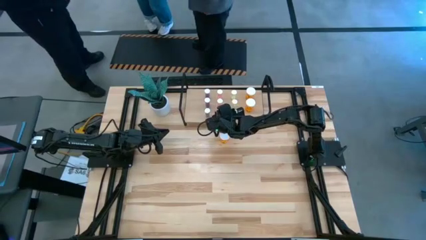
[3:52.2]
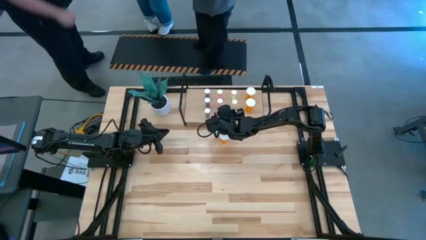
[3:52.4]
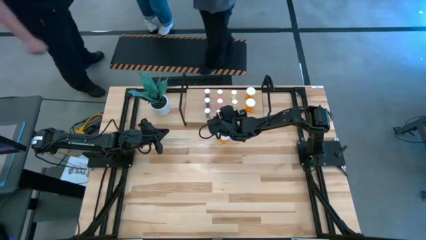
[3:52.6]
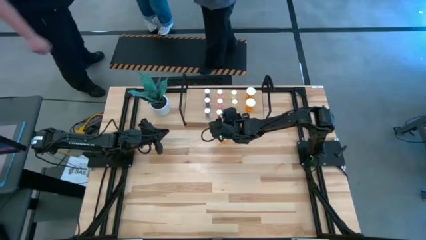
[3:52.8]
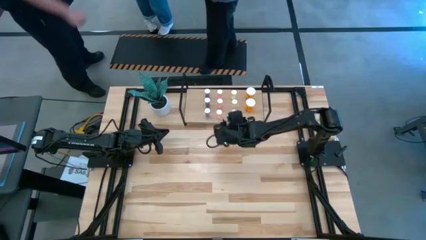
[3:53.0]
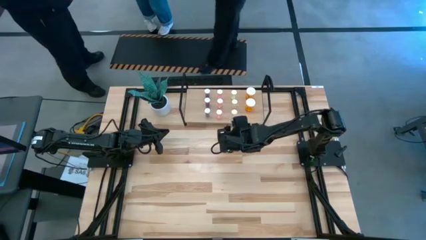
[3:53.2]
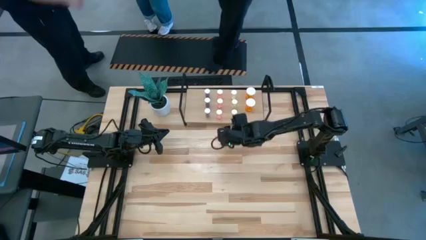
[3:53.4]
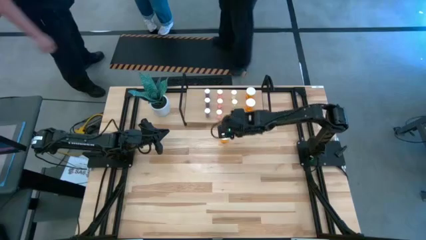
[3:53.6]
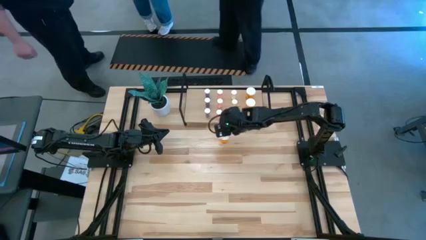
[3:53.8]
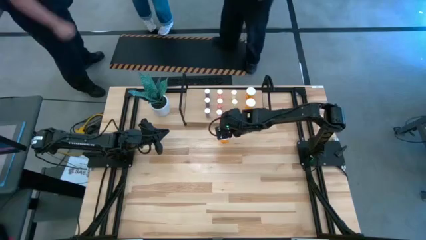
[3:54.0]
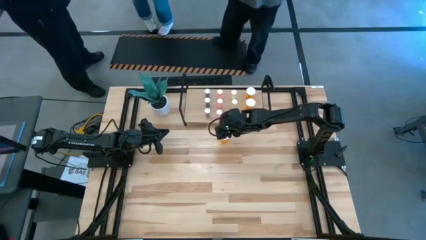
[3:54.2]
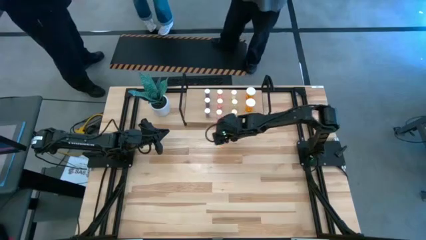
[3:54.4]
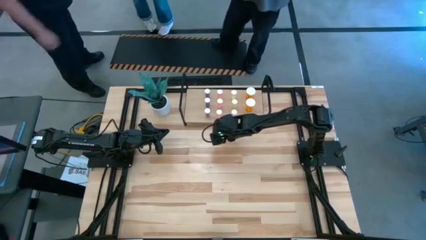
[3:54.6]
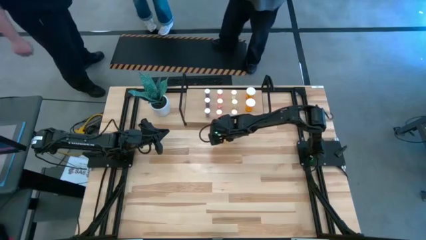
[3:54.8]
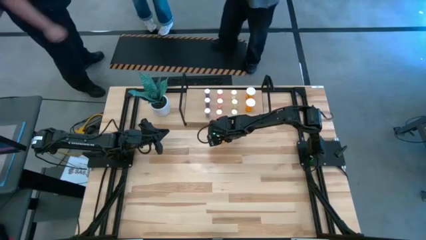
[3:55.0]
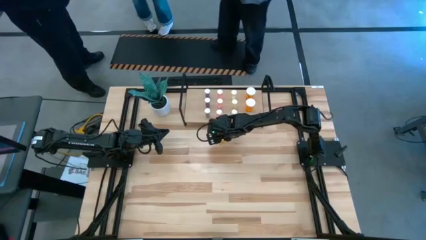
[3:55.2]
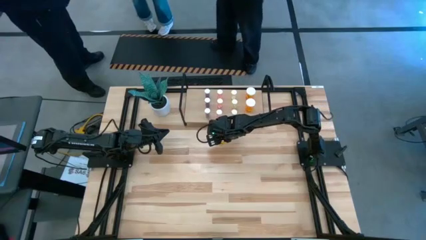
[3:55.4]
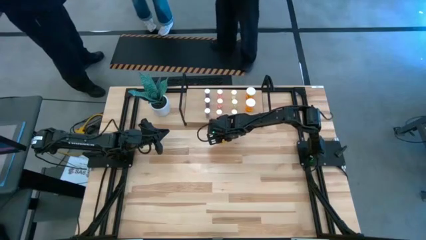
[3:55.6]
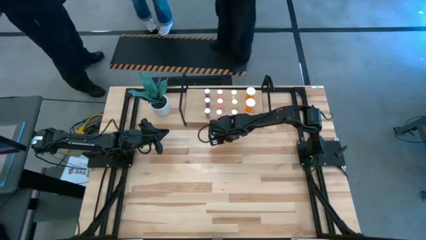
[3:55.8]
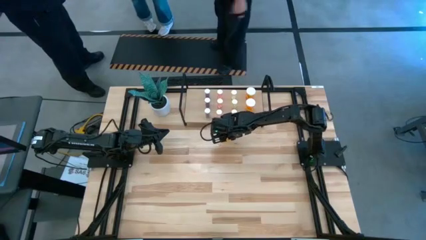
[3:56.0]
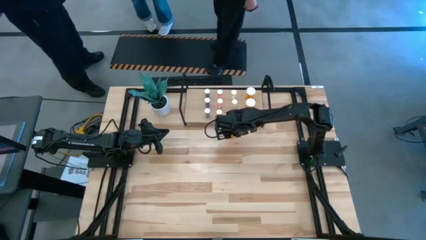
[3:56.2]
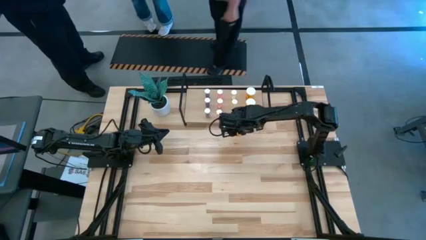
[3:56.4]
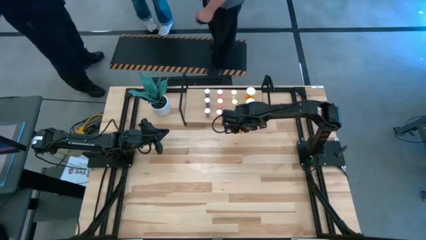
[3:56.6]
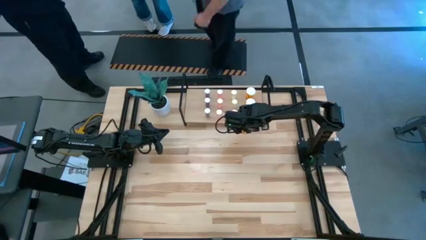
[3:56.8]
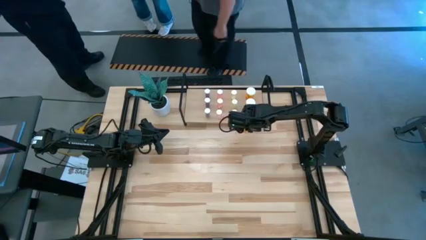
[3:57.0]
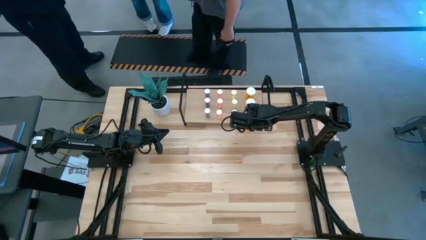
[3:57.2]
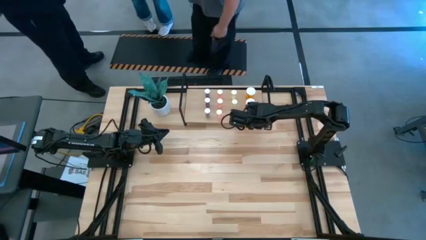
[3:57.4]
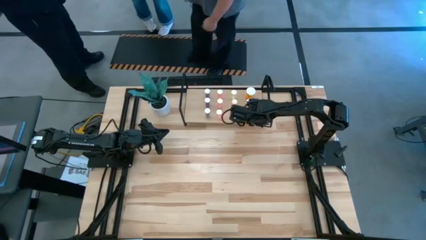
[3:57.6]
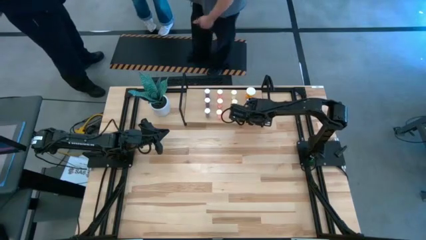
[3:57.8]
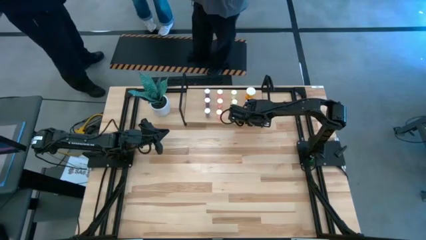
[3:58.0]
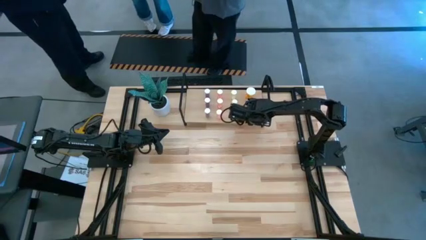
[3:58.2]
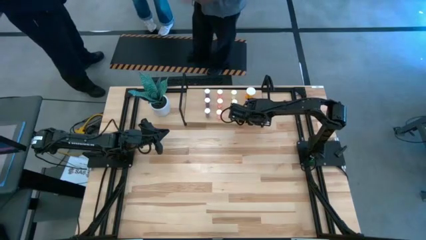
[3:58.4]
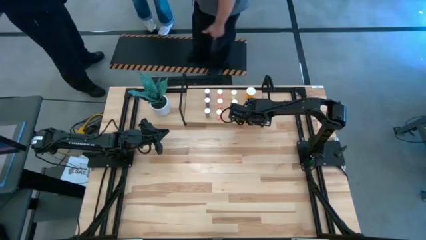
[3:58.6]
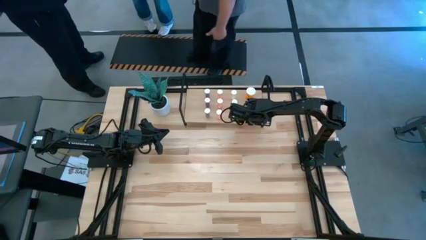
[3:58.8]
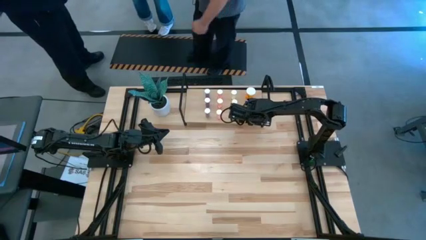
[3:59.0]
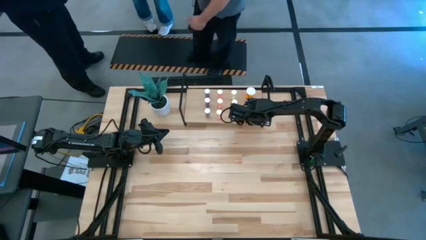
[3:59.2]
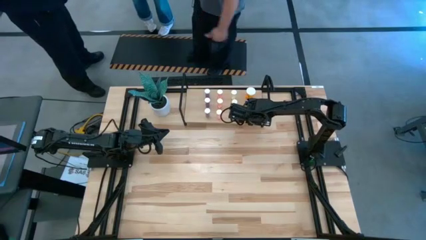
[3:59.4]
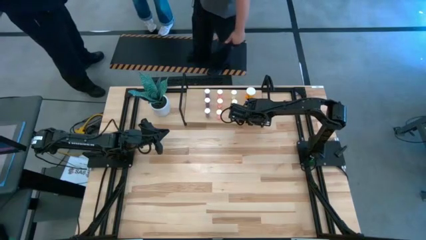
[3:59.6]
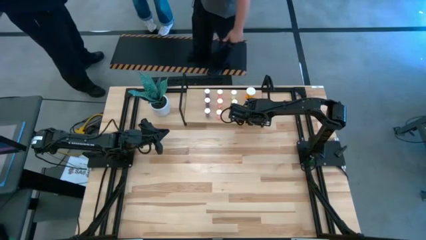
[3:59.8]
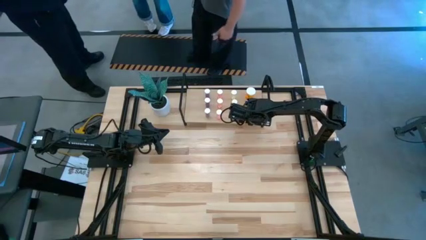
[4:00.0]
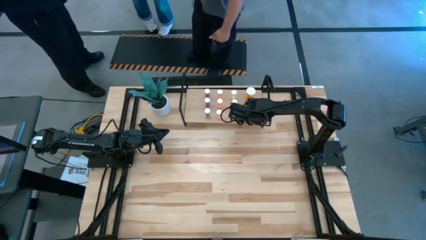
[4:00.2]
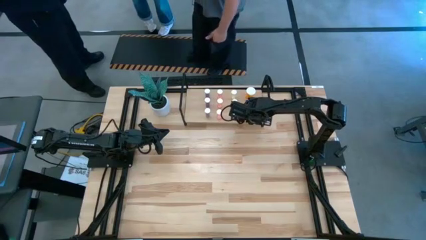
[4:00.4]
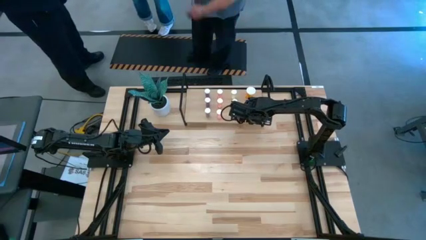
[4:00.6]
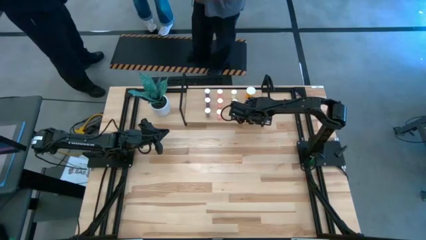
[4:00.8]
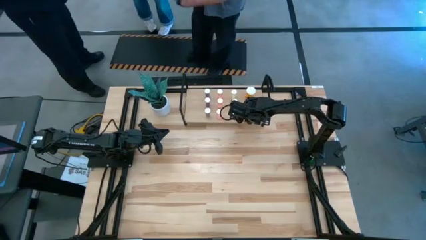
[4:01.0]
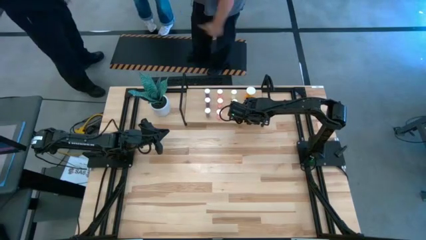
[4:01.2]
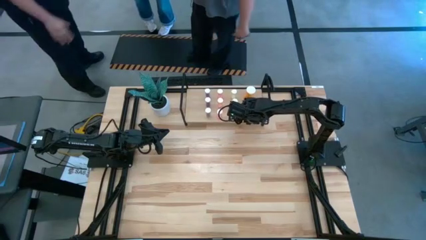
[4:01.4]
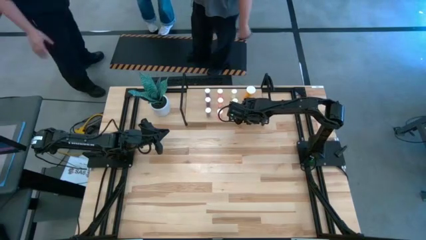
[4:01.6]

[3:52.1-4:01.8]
Task: Pick and place medicine bottles onto shelf by color
Put the orange pill bottle on the shelf

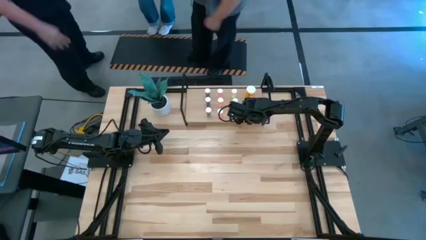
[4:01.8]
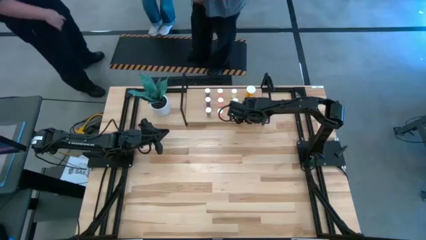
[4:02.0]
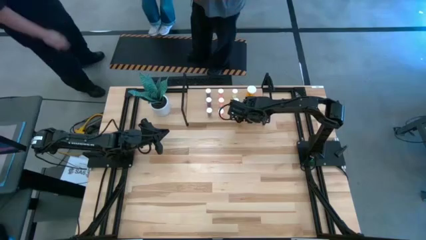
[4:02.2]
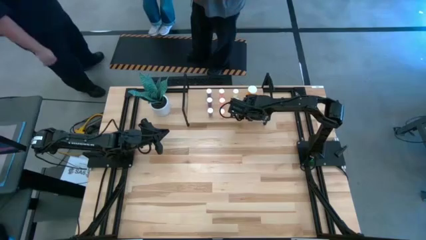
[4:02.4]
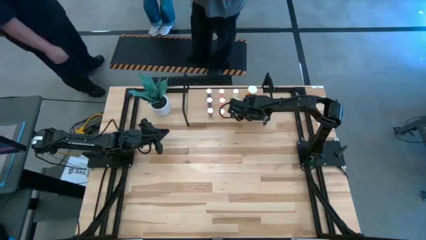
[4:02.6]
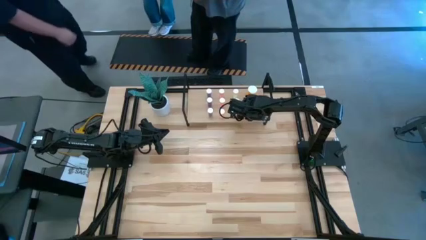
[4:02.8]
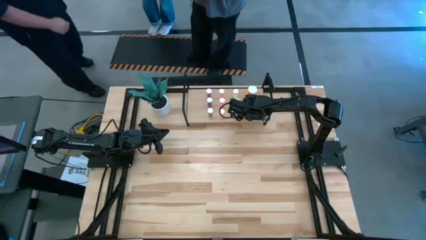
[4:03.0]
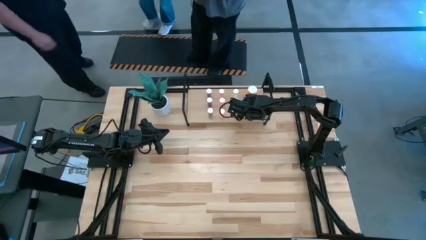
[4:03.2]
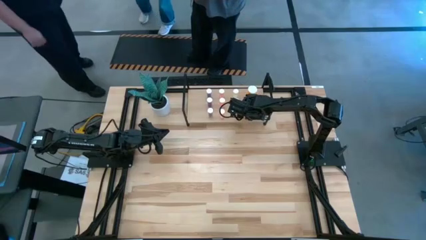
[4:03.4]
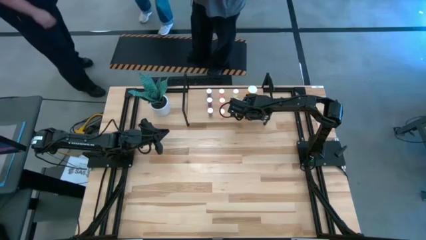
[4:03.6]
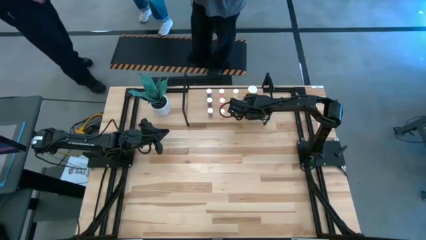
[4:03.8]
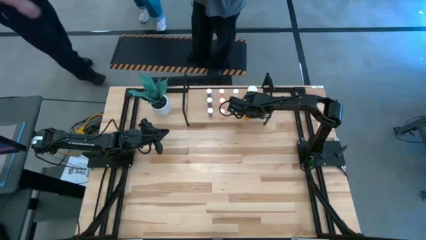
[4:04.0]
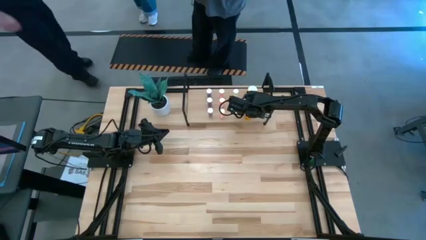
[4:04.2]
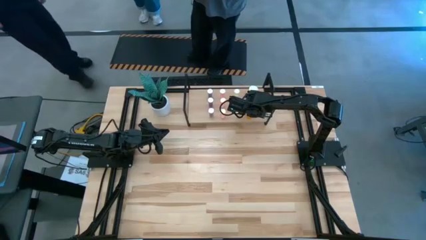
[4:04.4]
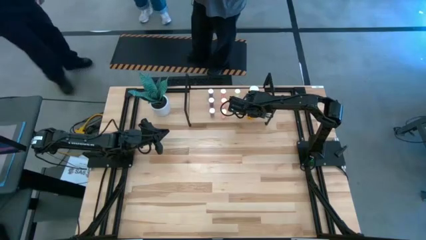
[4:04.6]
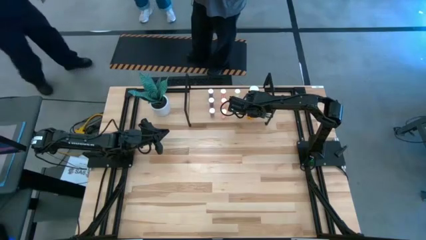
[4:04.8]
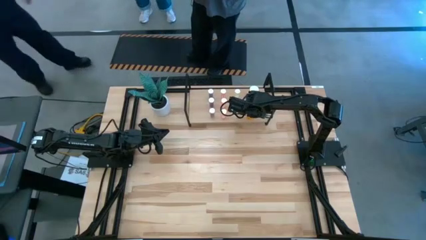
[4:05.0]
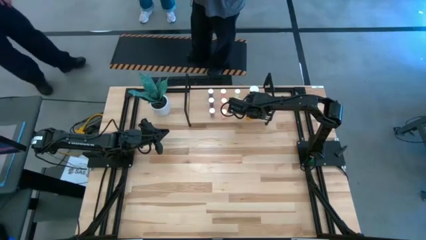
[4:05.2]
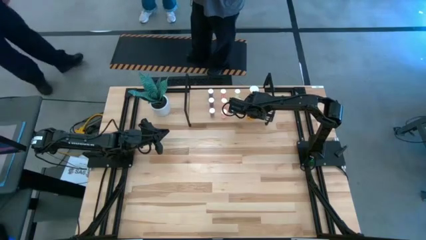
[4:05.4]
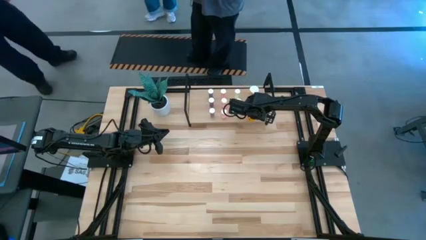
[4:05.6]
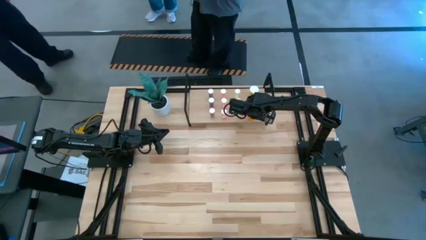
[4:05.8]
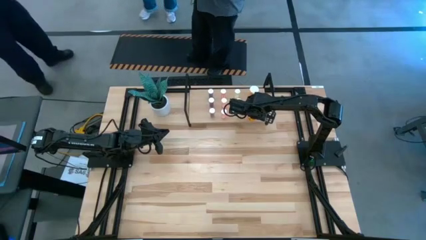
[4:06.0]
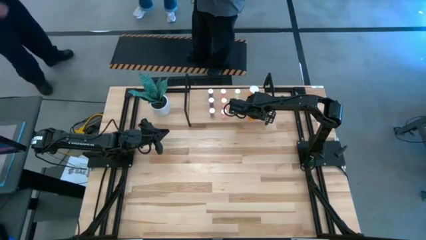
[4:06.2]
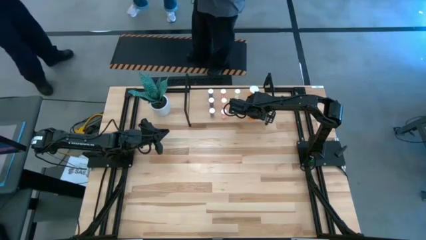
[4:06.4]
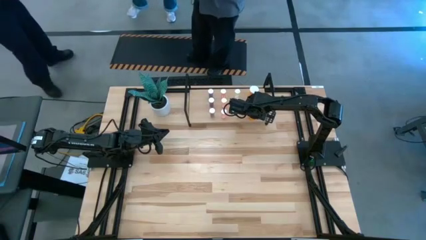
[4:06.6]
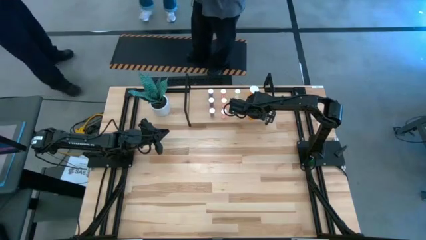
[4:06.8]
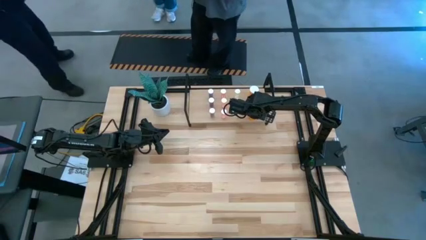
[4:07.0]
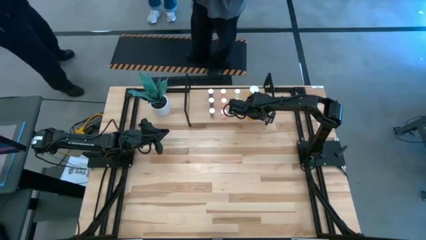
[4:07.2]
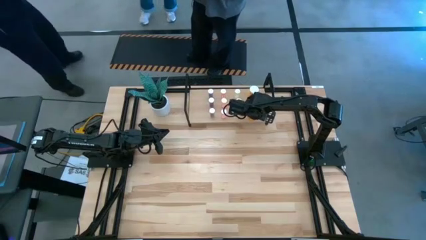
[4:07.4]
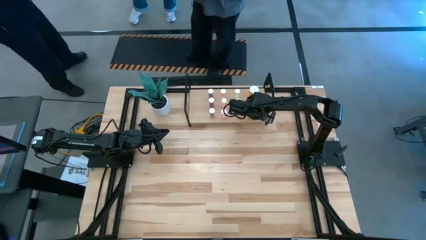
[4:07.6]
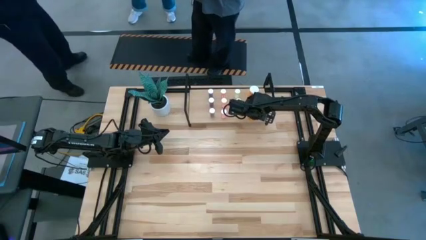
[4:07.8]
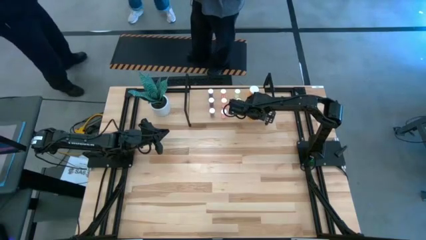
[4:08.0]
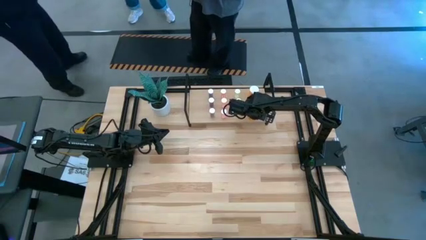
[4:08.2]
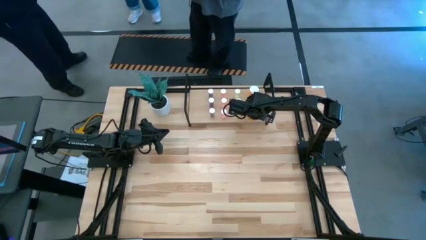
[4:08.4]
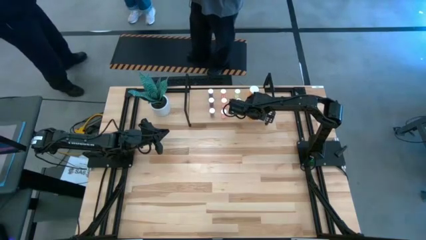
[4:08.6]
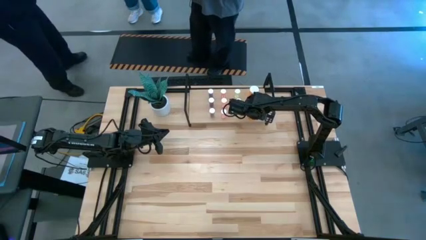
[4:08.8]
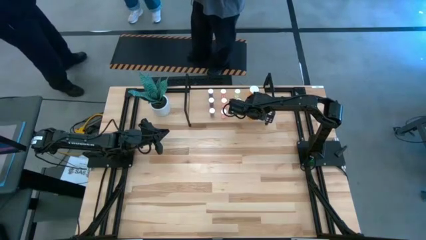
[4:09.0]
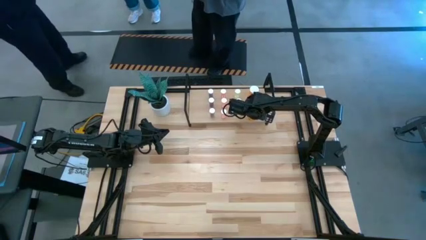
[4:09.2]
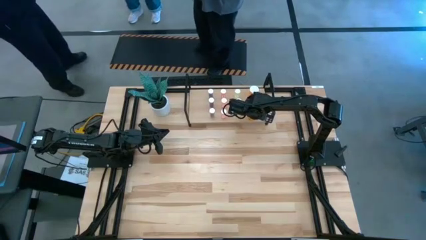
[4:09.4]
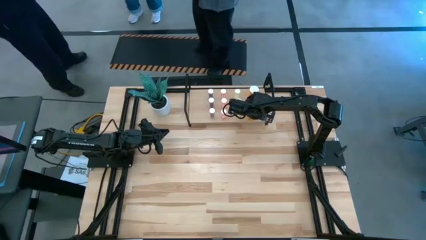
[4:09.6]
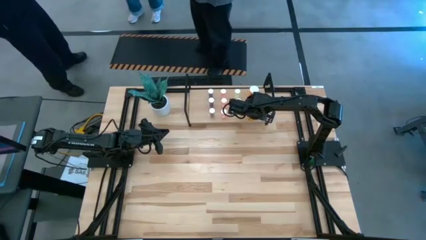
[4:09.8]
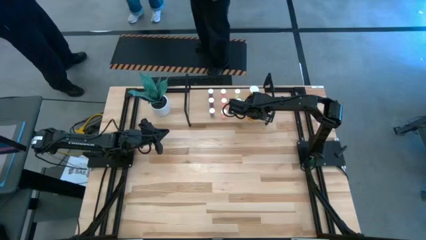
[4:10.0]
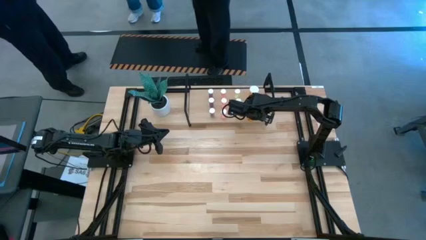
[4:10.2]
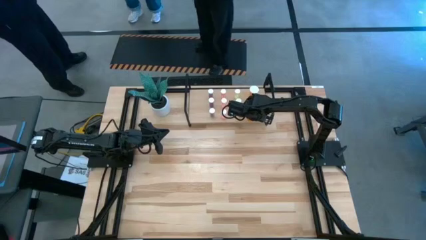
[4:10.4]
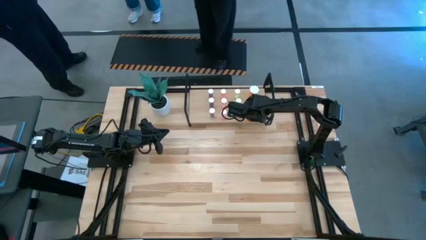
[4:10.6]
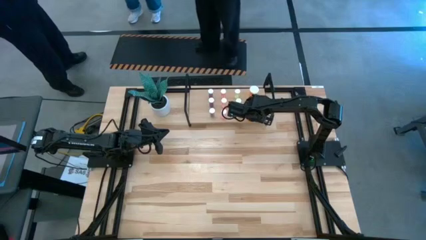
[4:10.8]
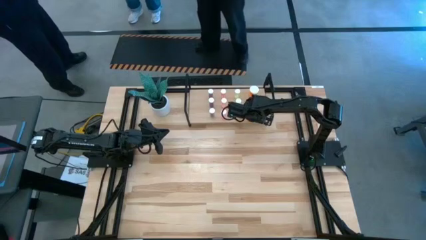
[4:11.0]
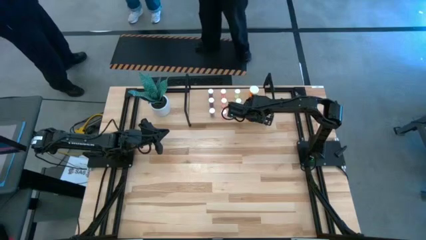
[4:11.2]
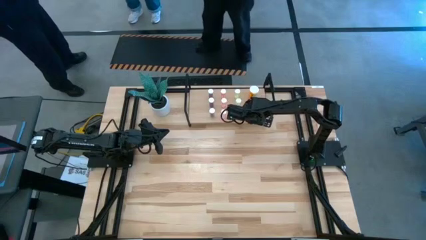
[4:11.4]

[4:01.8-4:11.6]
Put the orange pill bottle on the shelf
